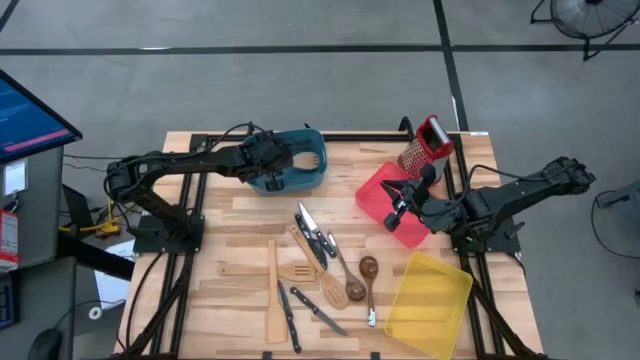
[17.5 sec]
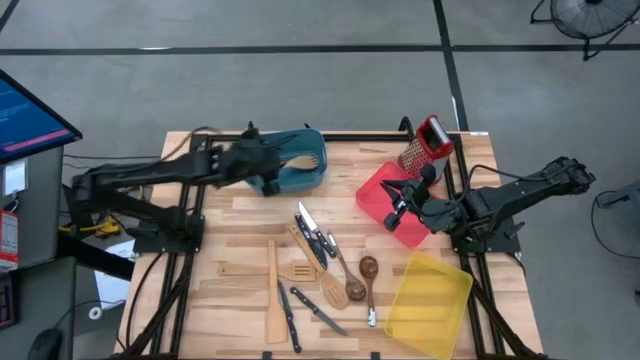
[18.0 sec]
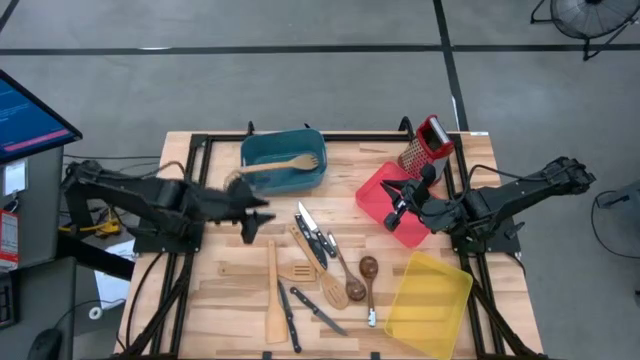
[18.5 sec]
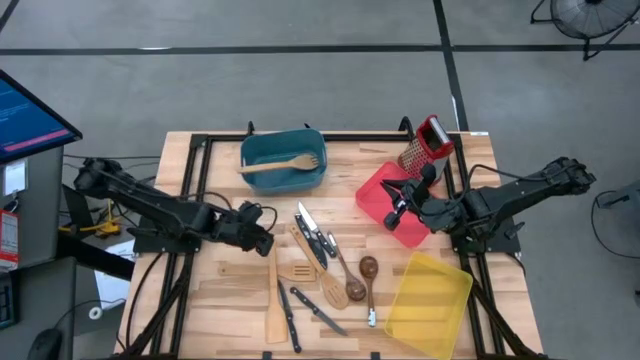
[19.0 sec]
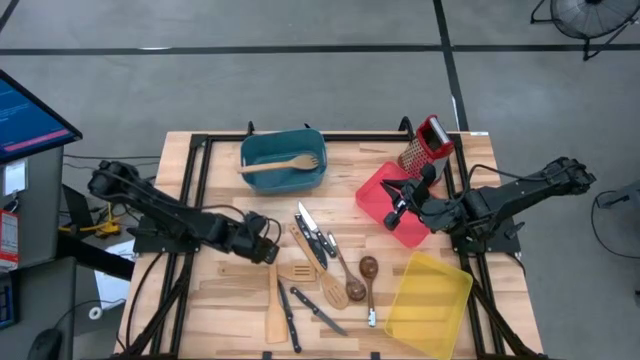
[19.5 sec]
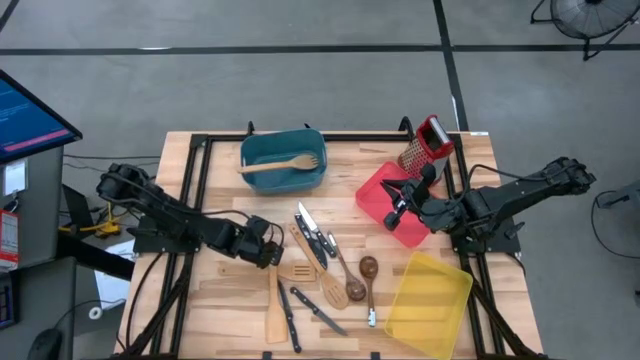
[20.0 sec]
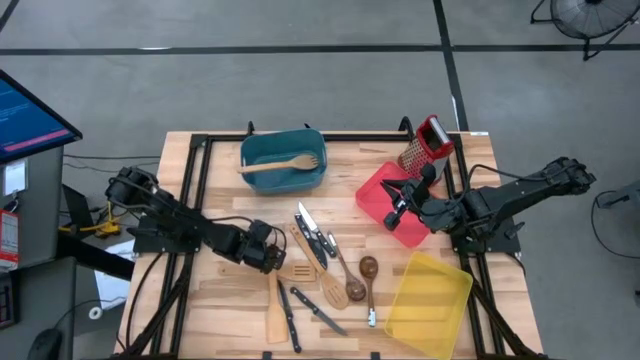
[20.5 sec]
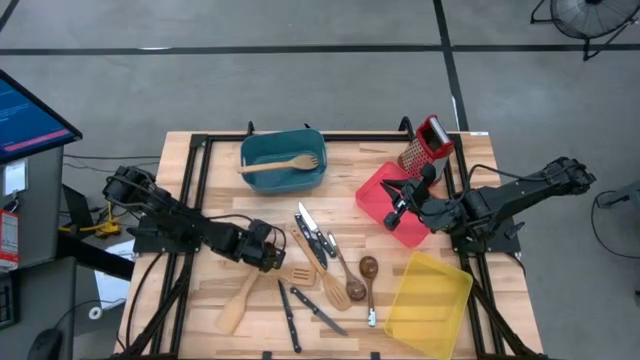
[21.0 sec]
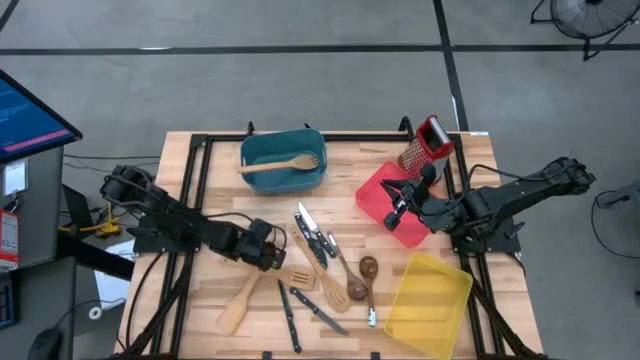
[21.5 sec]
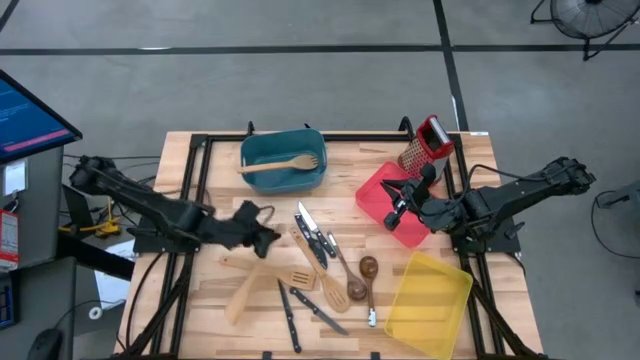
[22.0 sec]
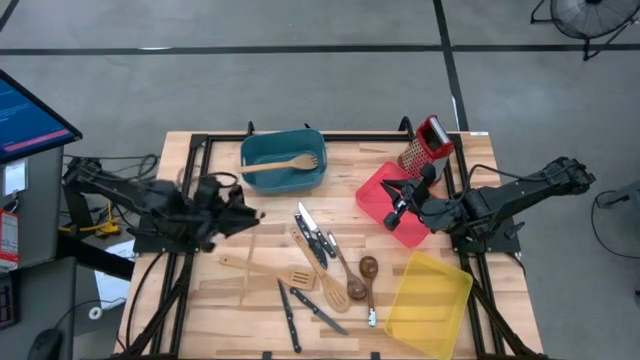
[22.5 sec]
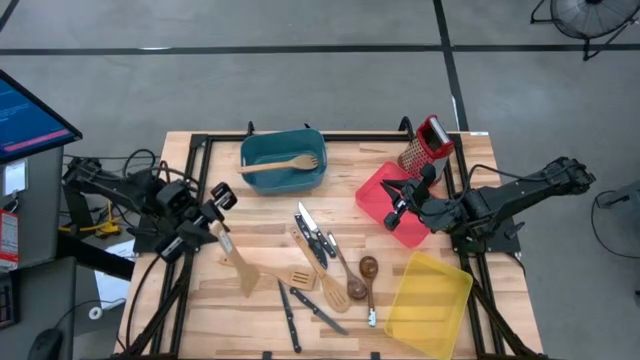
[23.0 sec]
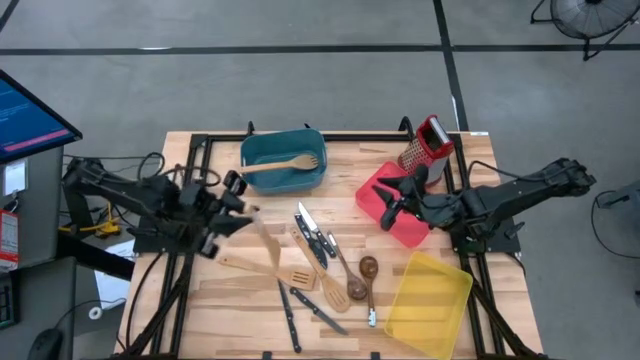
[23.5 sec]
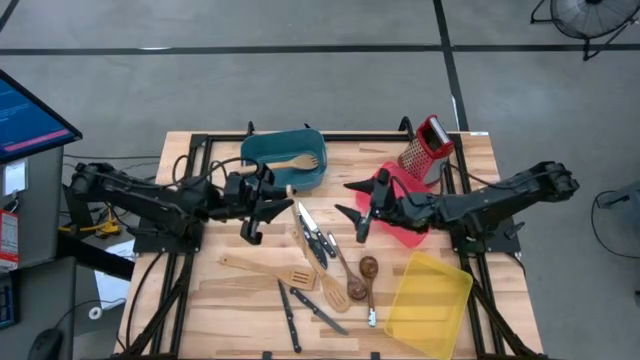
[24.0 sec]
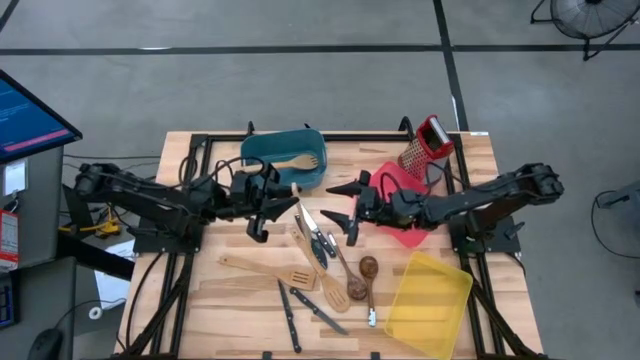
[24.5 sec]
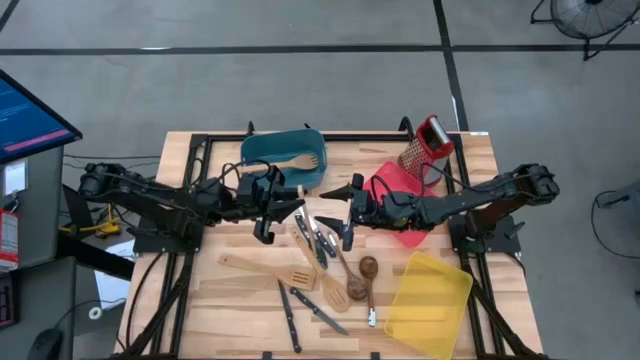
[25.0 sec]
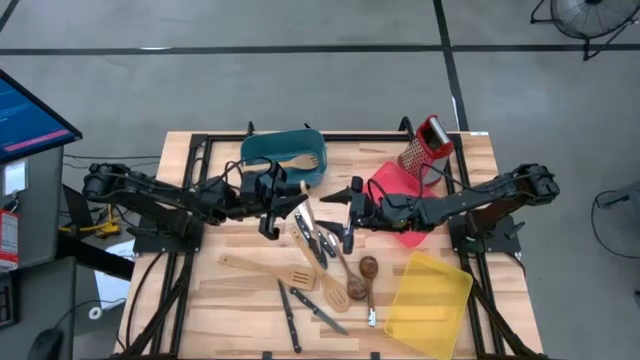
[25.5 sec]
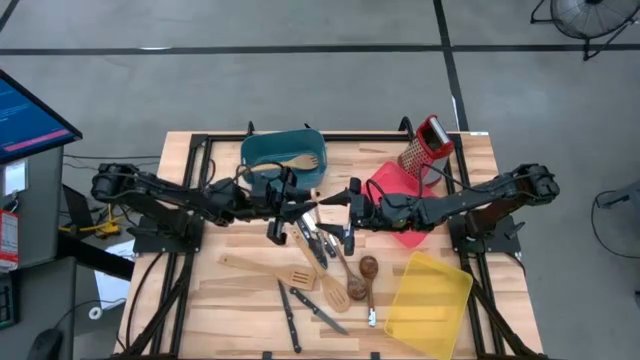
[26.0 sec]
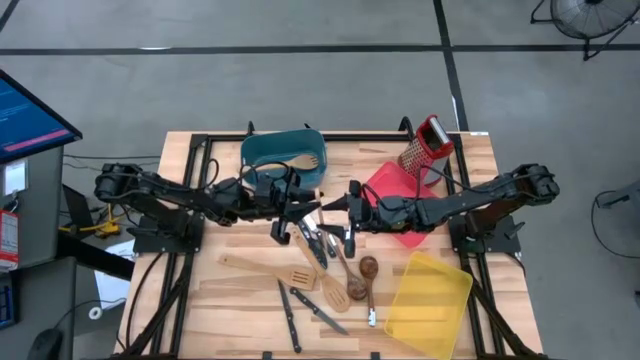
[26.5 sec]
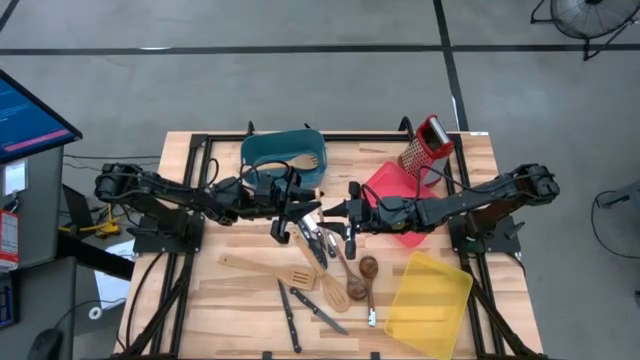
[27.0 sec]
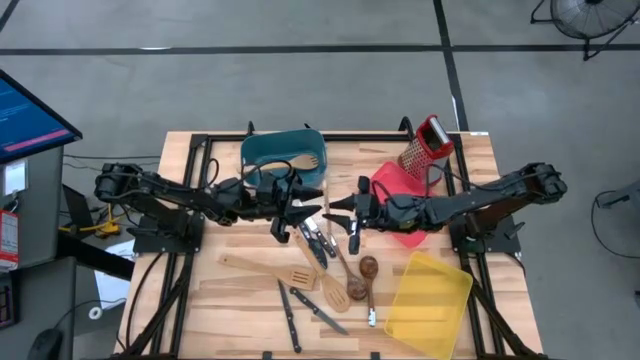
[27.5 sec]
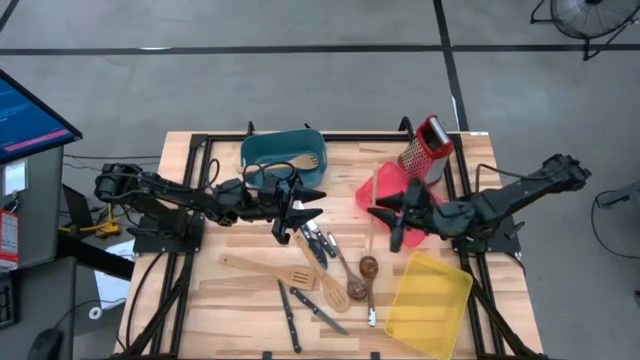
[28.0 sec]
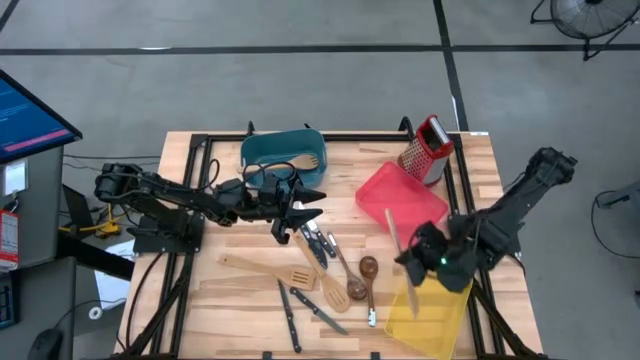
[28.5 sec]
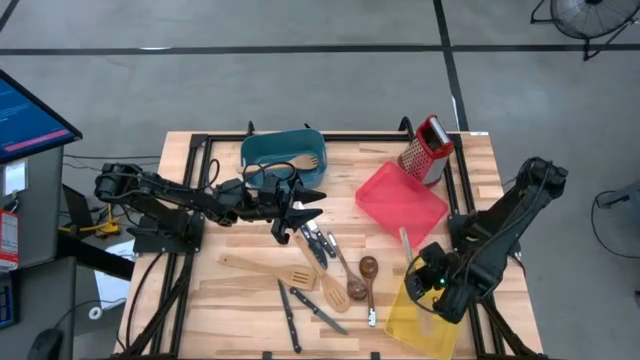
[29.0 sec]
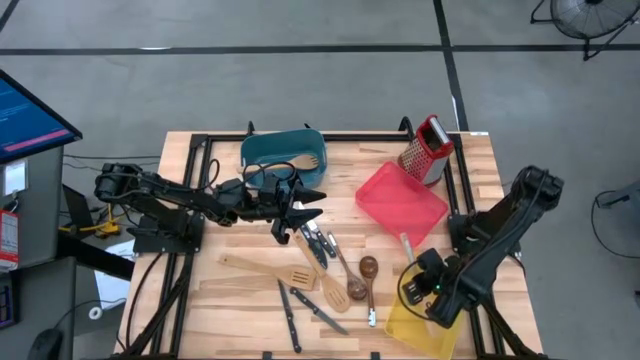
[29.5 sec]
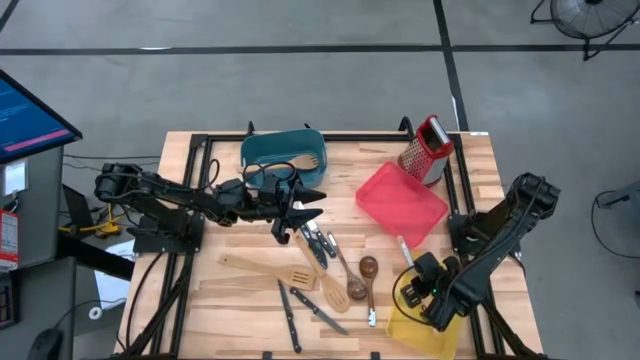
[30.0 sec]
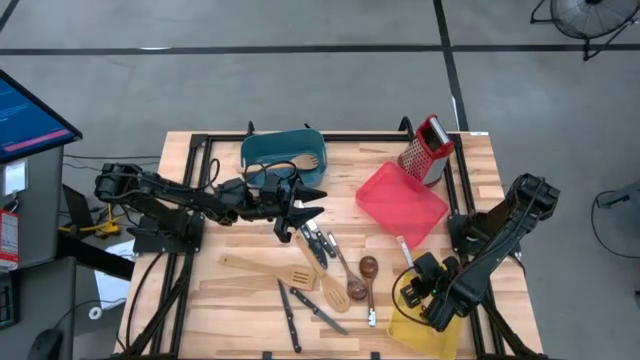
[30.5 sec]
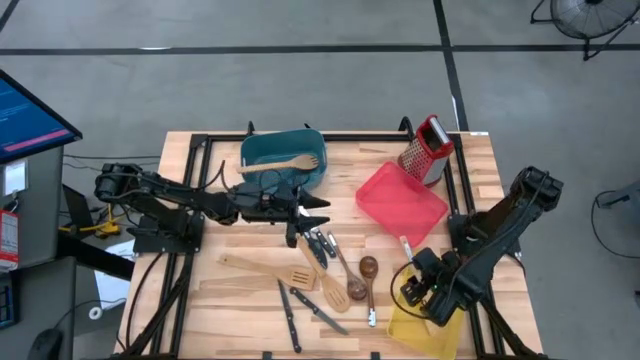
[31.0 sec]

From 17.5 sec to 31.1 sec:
Task: Pick & Place Kitchen Items
Put the wooden spatula into the yellow bin
